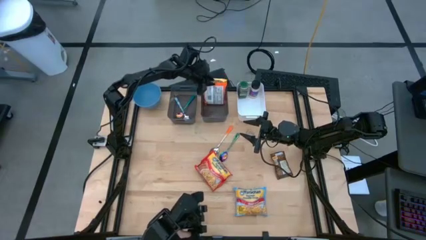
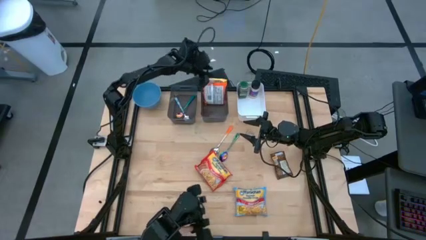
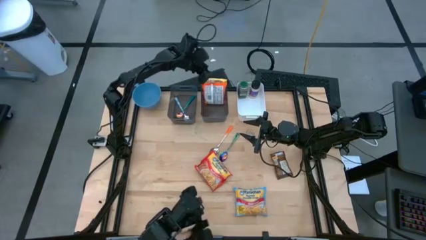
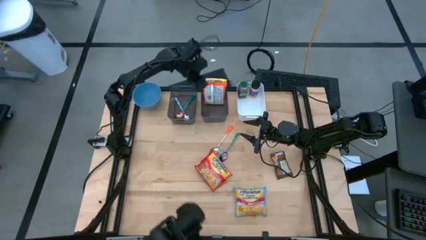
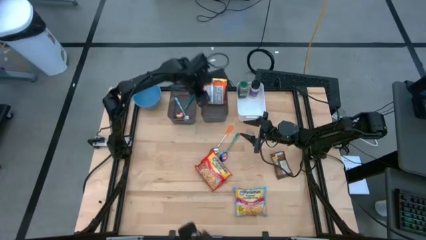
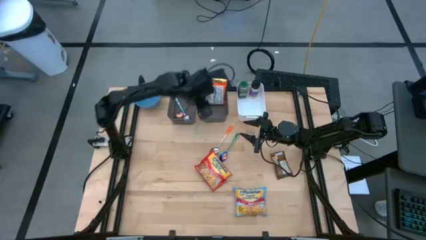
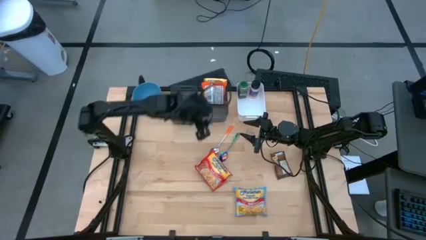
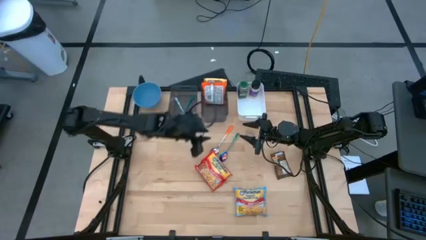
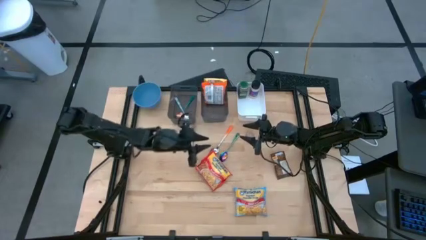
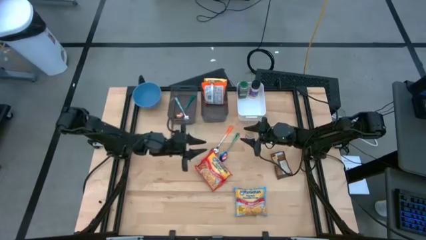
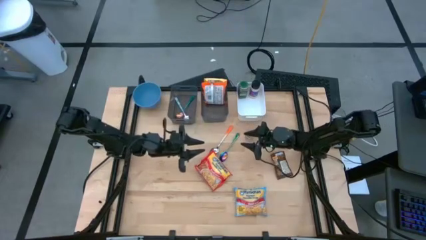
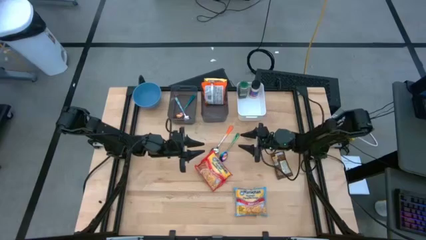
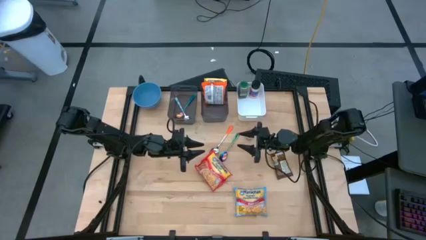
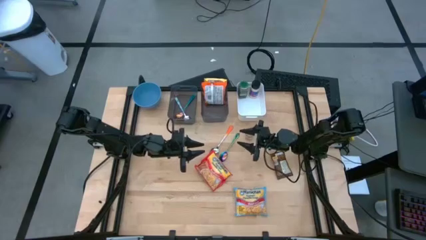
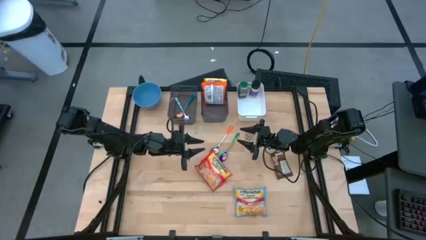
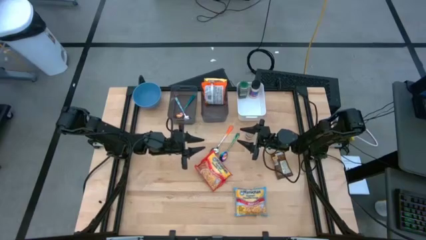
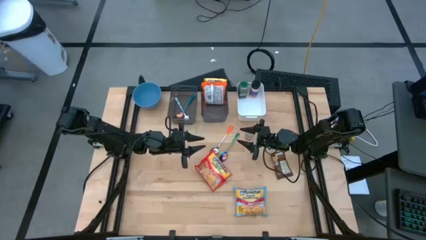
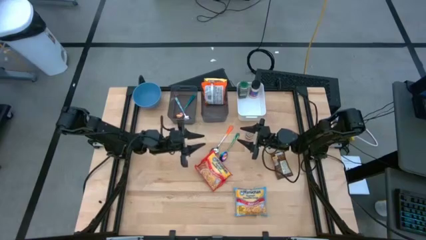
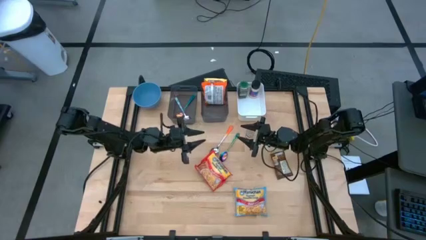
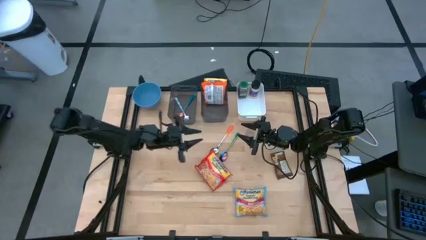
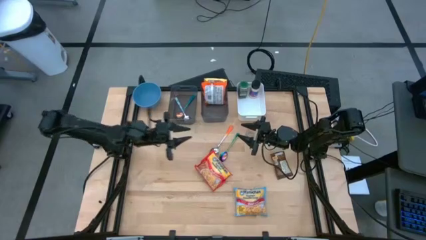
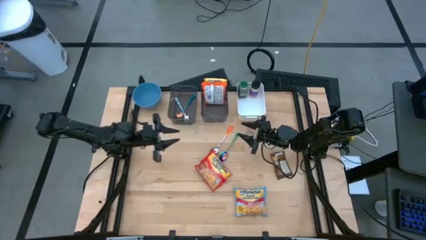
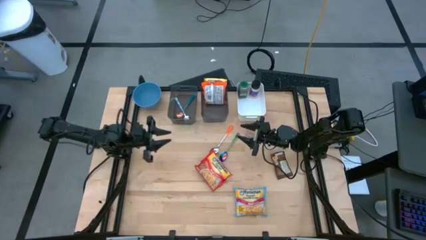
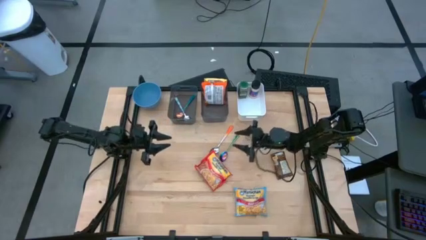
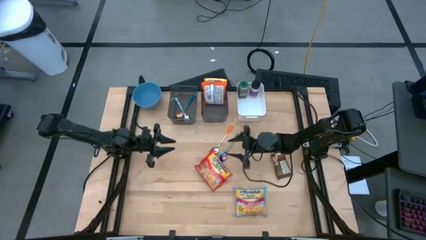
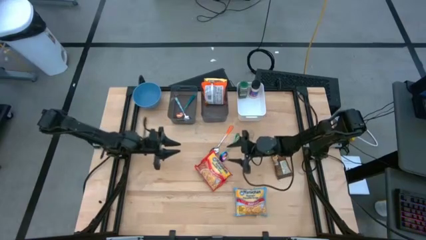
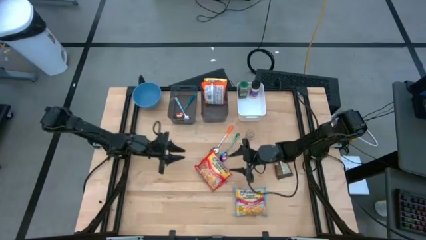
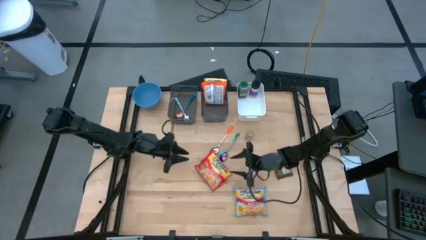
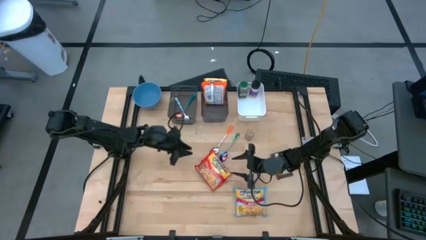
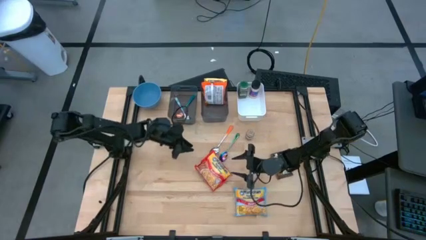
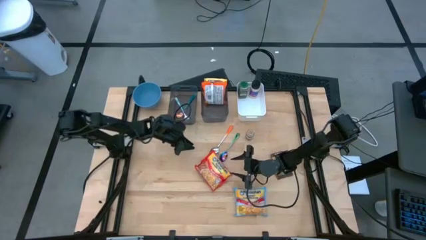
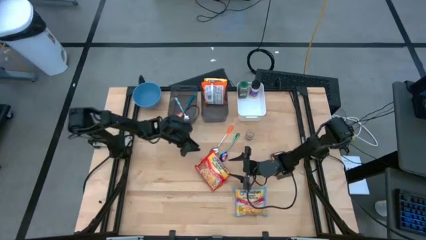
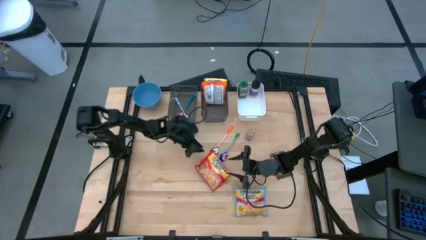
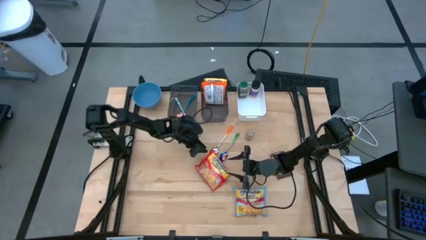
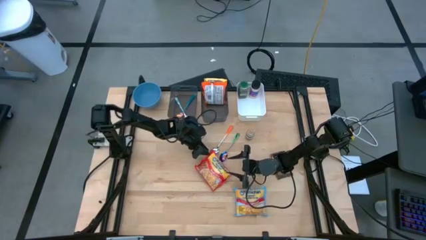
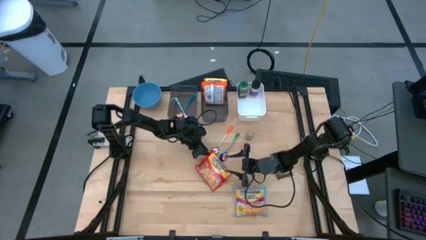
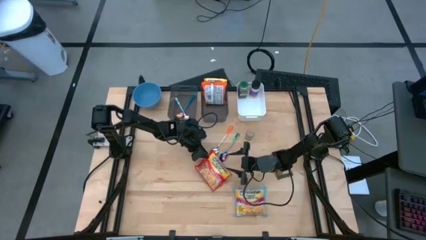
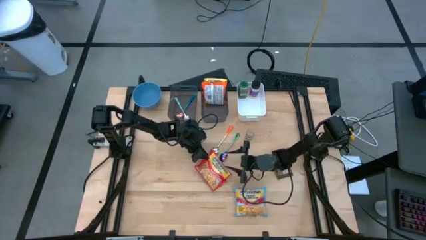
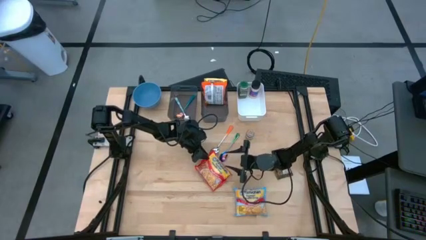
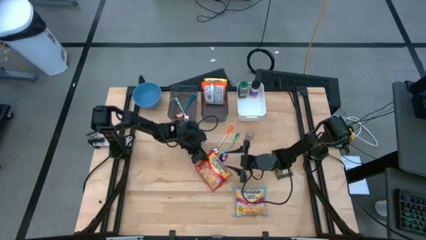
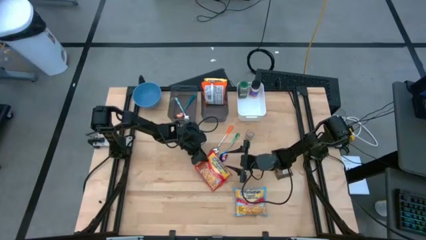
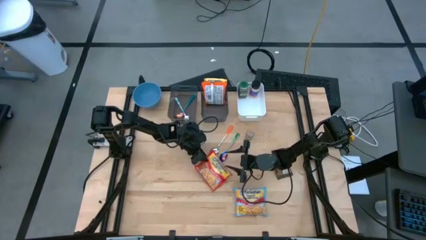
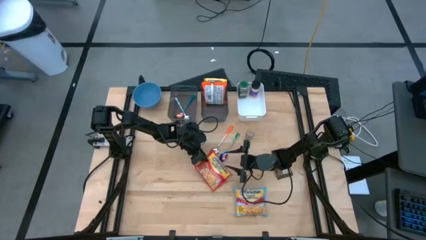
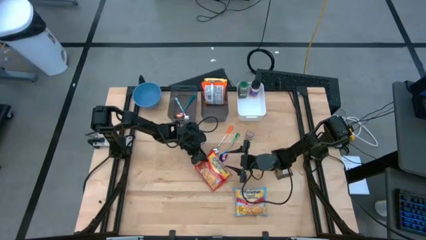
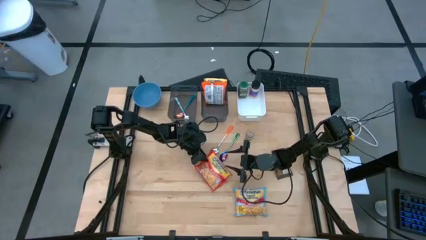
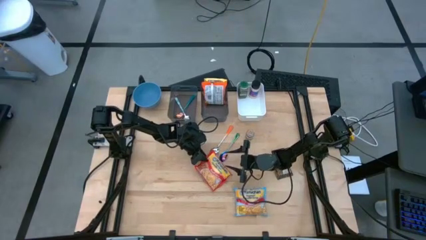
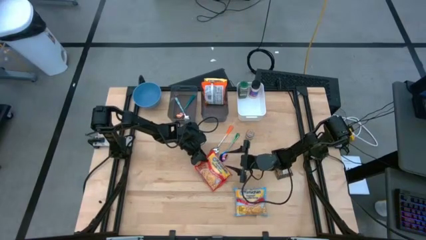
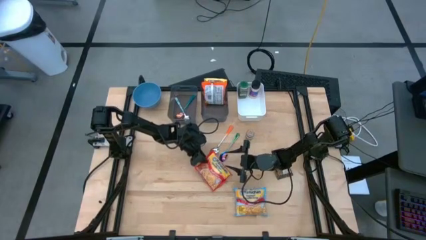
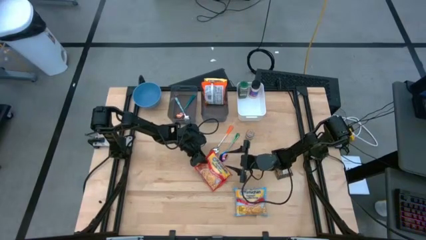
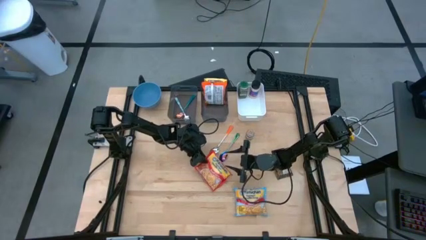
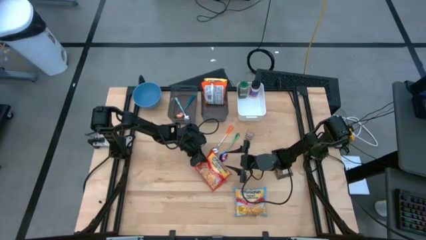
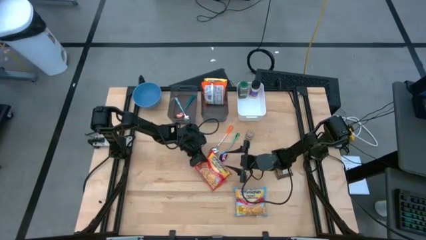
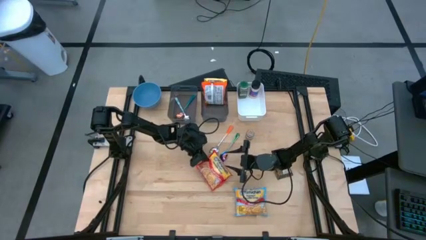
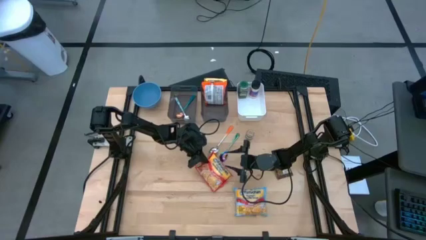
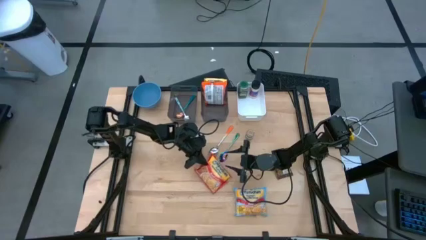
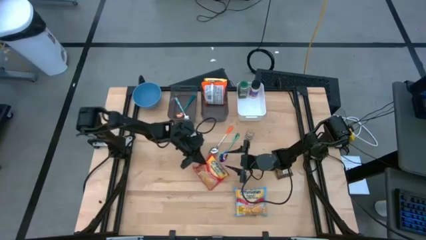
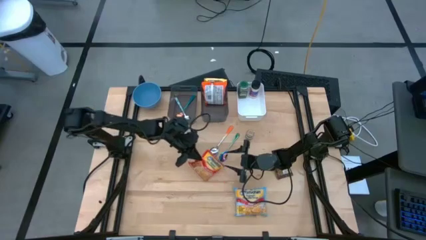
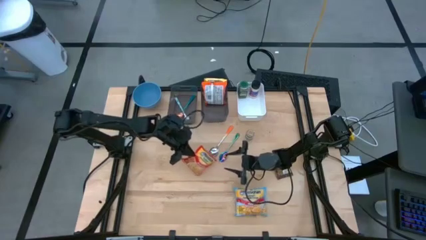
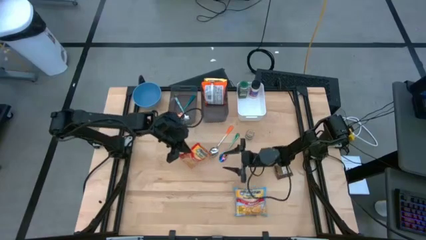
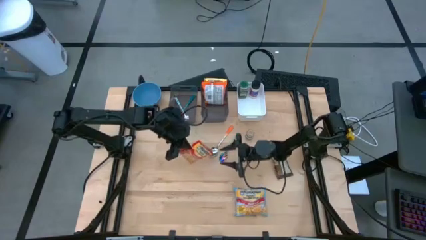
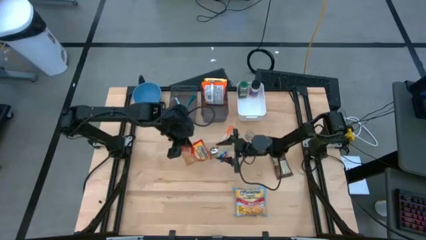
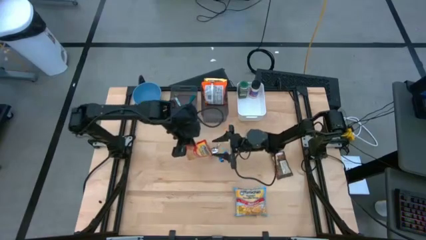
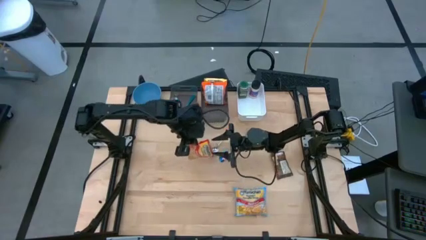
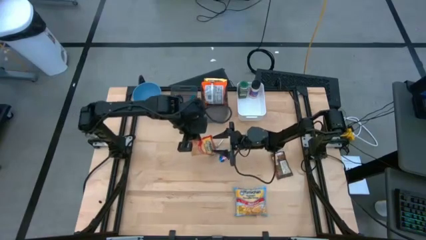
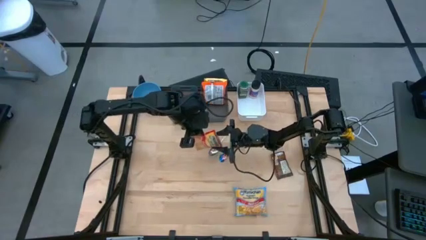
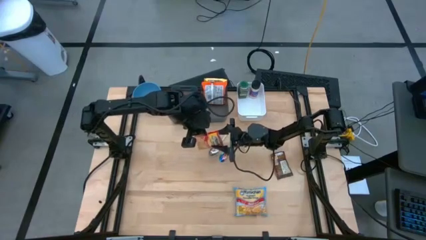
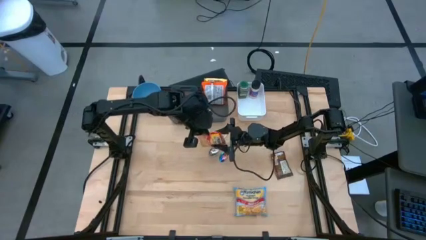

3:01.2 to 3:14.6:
Task: Pick & Place Food Item
Put the red noodle pack into the right black bin

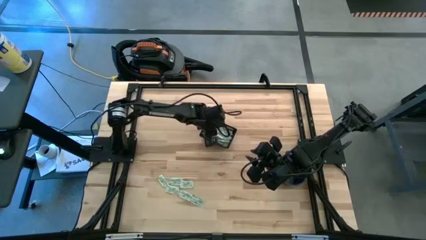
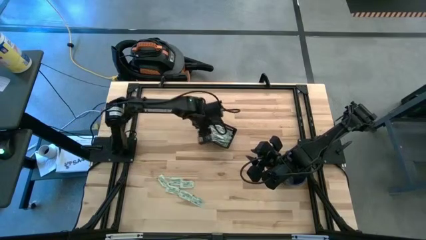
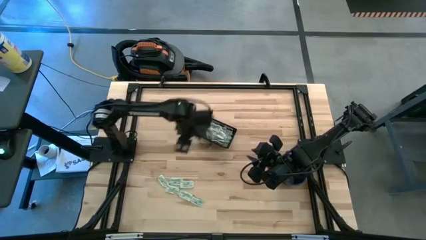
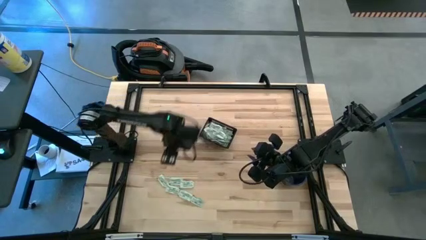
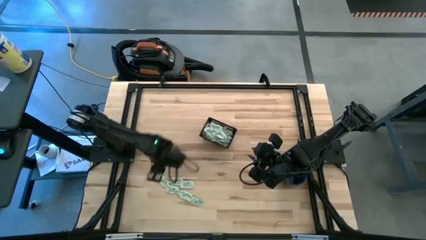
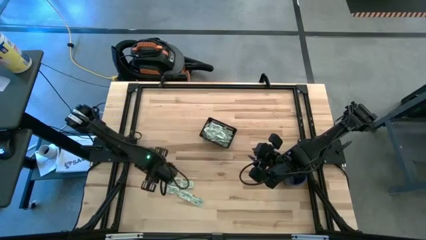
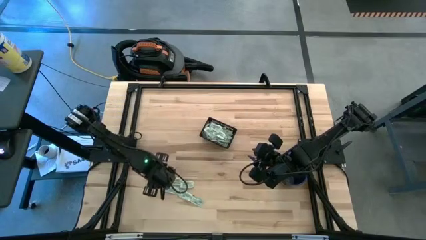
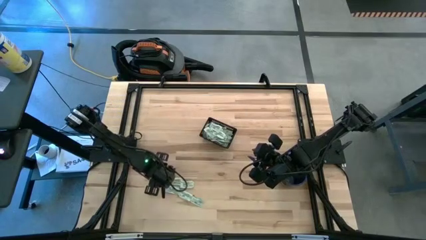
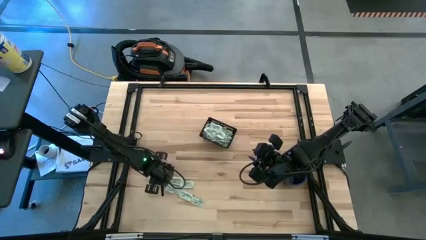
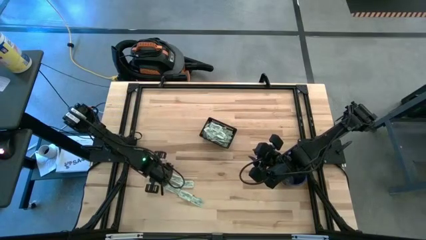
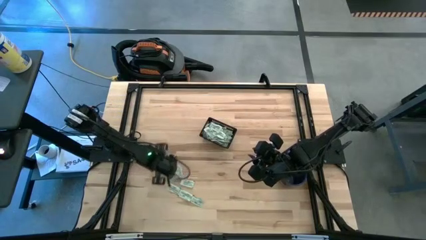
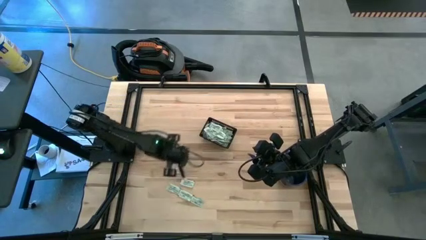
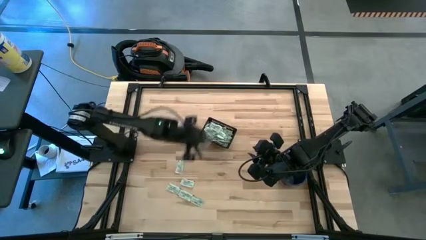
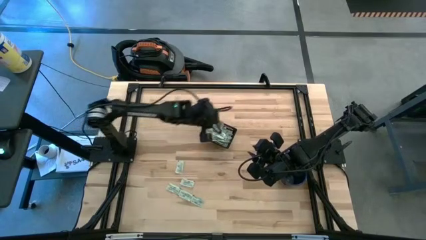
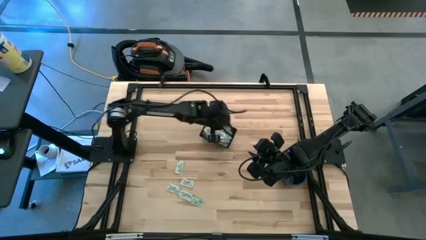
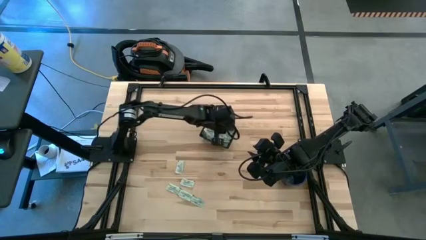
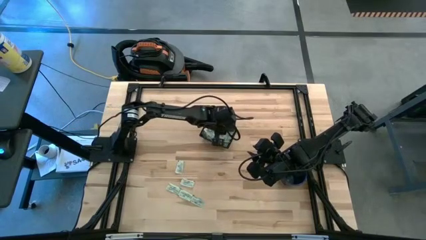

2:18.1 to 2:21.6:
Task: Pick and place Stevia / Truvia into bins
Put the stevia packet into the black bin
